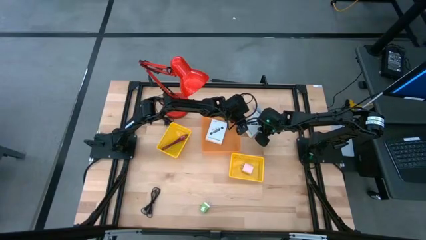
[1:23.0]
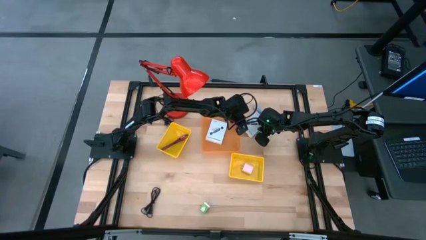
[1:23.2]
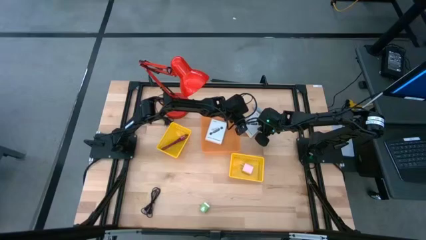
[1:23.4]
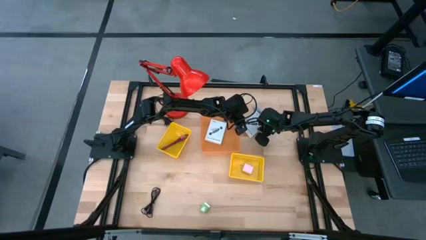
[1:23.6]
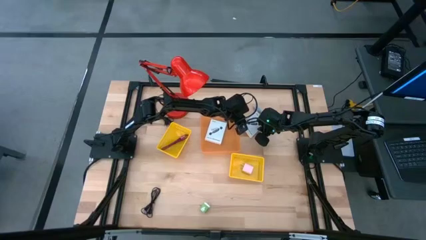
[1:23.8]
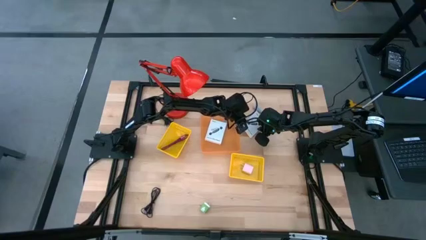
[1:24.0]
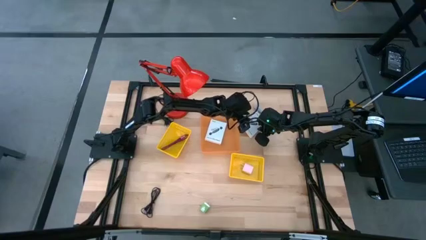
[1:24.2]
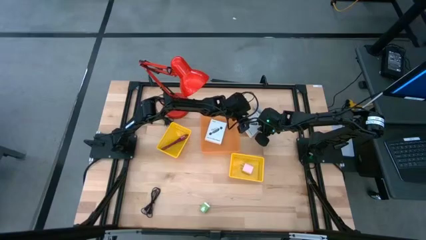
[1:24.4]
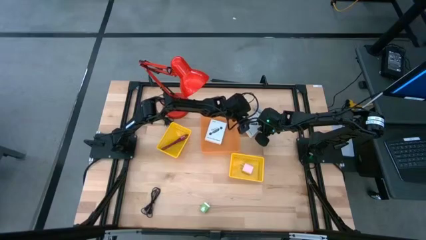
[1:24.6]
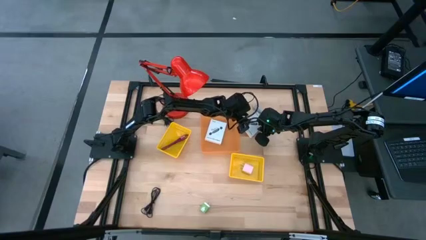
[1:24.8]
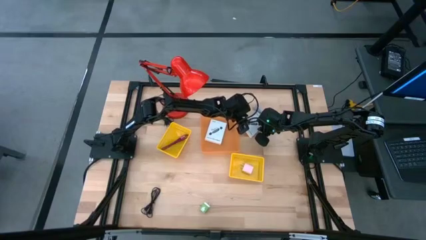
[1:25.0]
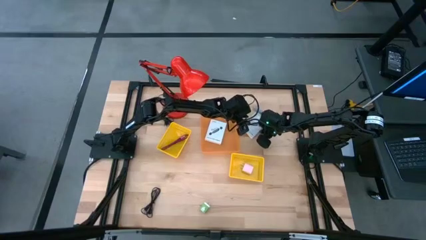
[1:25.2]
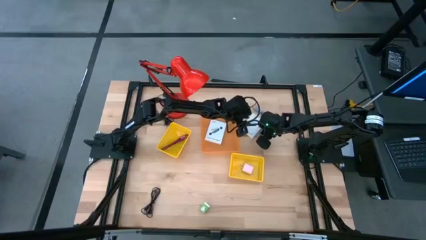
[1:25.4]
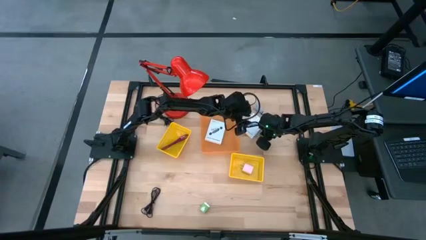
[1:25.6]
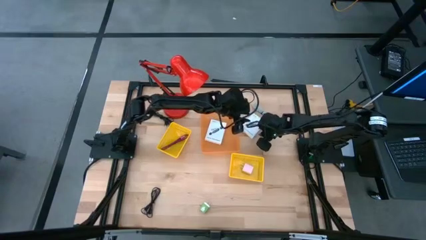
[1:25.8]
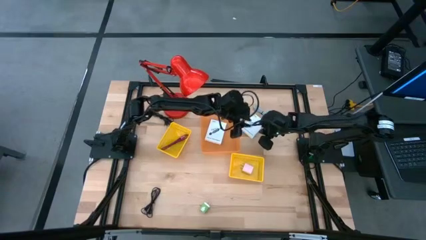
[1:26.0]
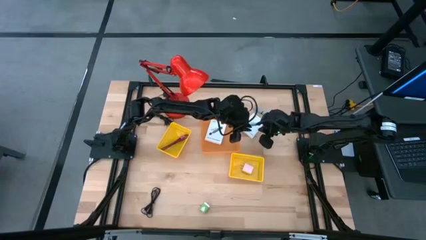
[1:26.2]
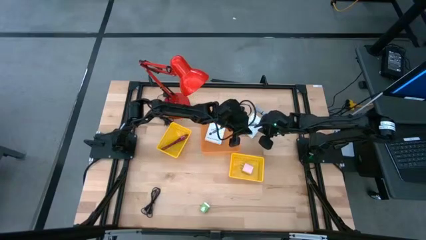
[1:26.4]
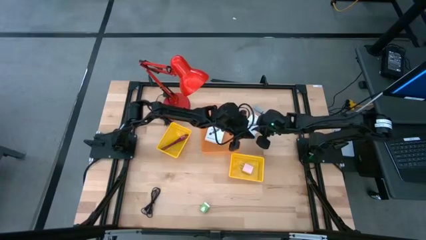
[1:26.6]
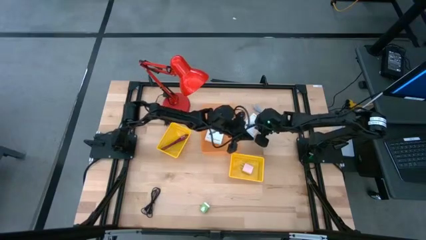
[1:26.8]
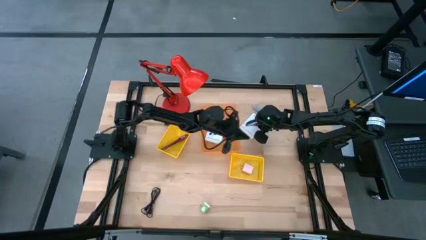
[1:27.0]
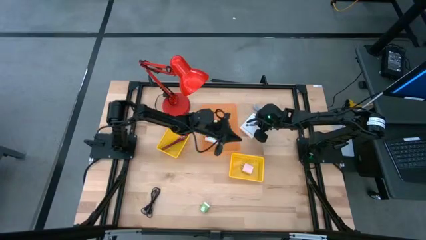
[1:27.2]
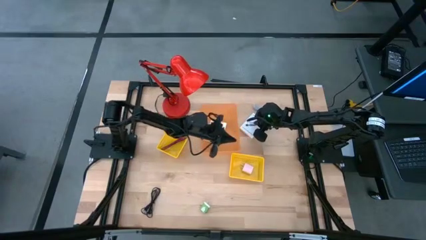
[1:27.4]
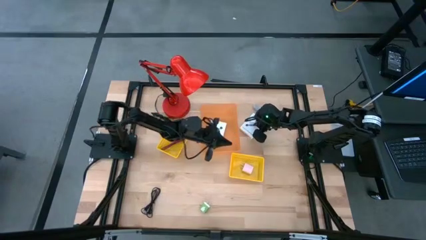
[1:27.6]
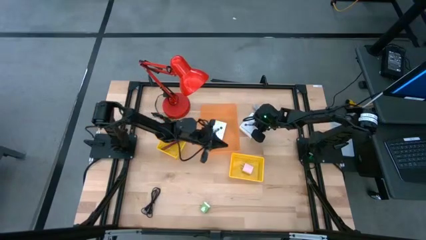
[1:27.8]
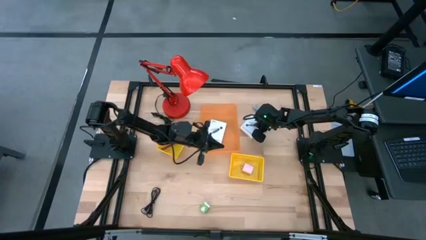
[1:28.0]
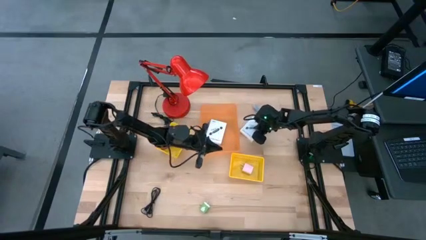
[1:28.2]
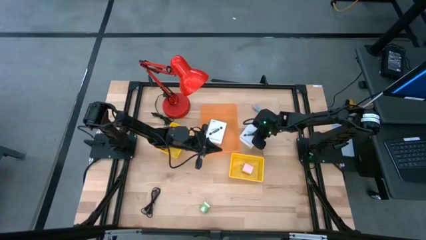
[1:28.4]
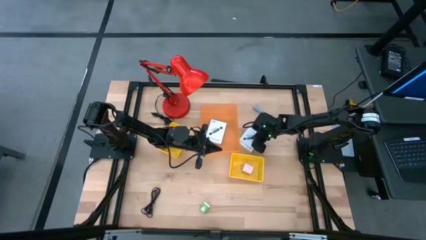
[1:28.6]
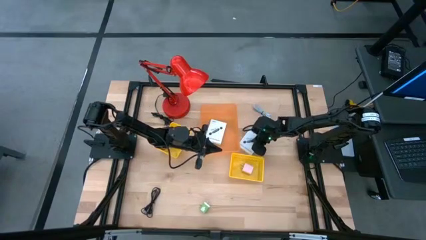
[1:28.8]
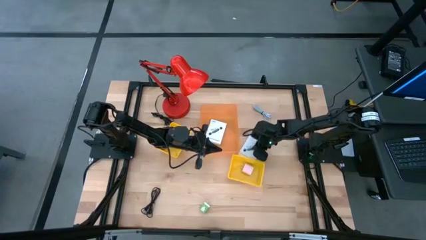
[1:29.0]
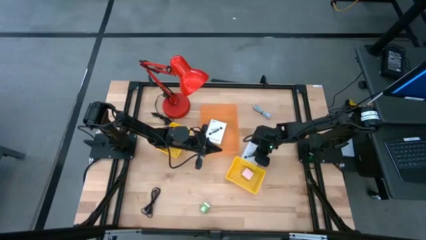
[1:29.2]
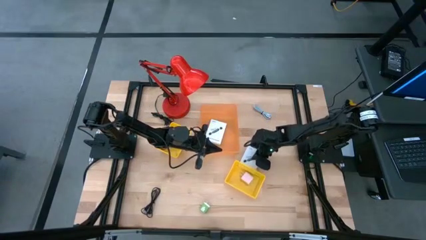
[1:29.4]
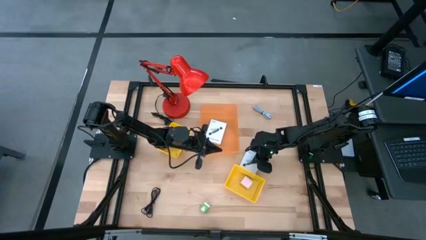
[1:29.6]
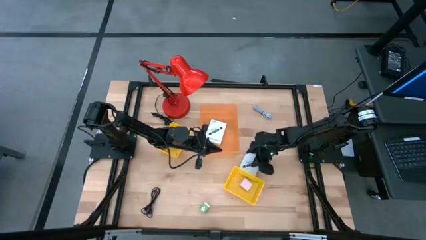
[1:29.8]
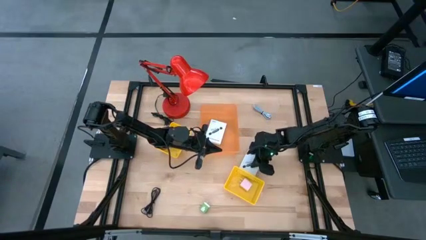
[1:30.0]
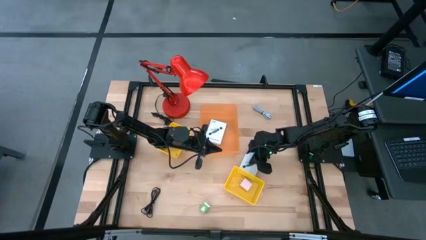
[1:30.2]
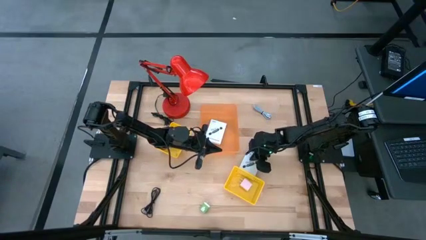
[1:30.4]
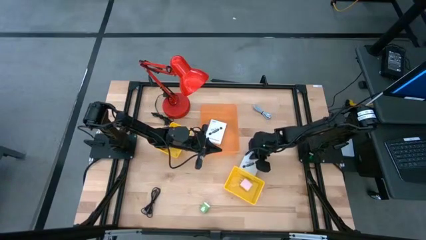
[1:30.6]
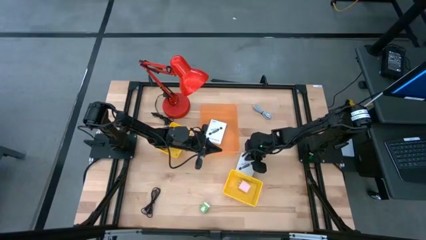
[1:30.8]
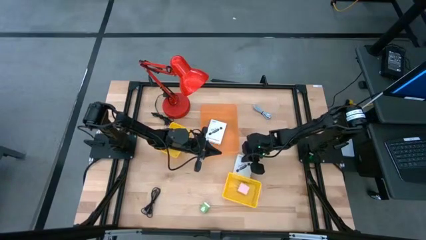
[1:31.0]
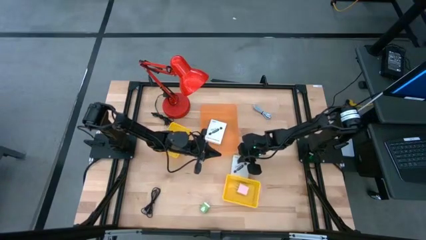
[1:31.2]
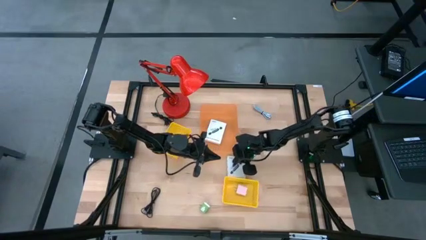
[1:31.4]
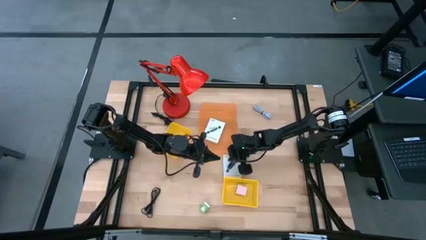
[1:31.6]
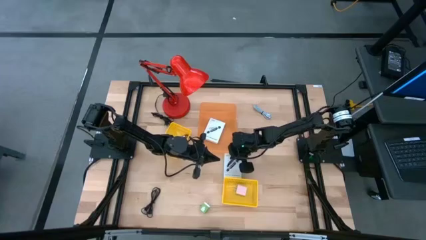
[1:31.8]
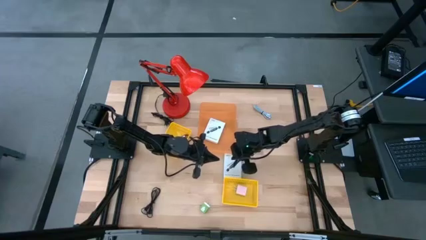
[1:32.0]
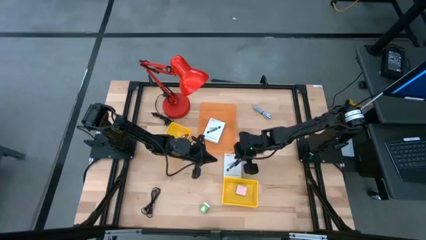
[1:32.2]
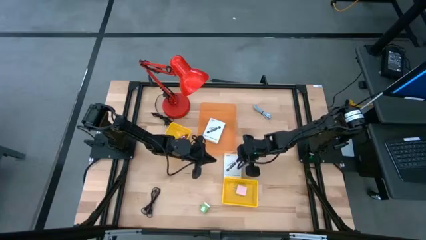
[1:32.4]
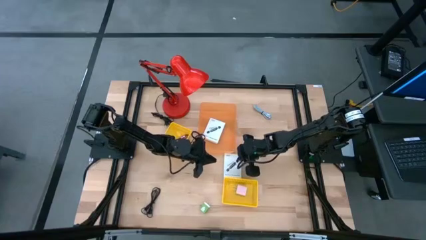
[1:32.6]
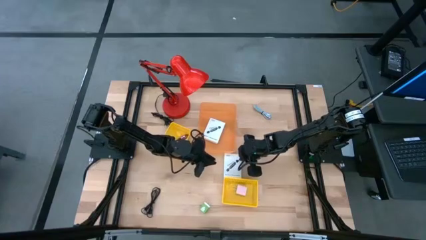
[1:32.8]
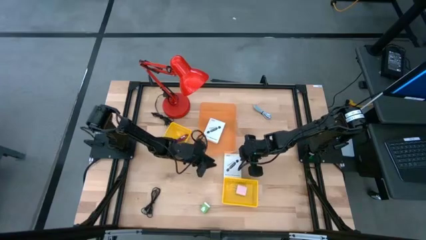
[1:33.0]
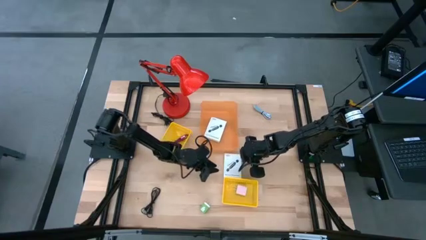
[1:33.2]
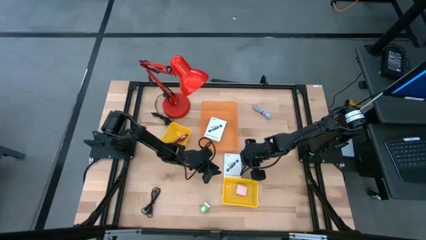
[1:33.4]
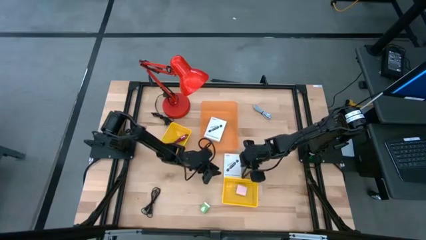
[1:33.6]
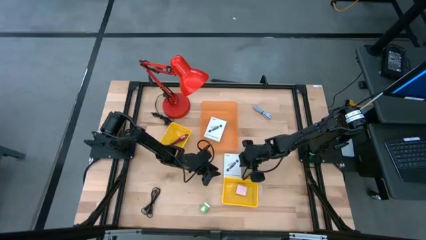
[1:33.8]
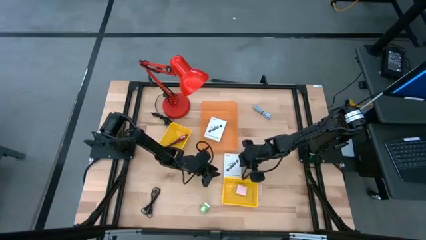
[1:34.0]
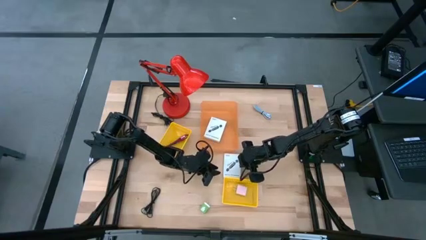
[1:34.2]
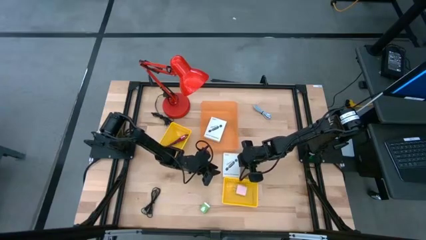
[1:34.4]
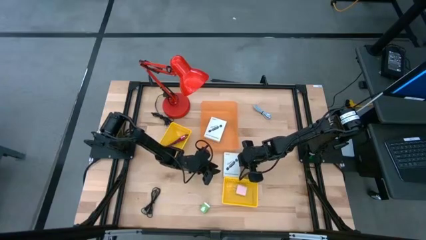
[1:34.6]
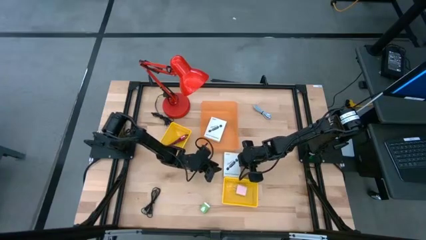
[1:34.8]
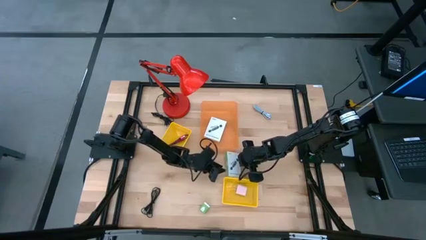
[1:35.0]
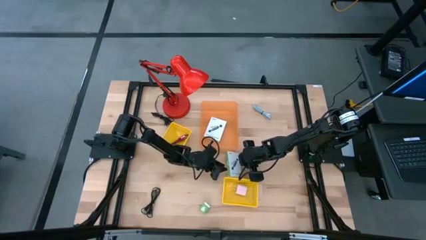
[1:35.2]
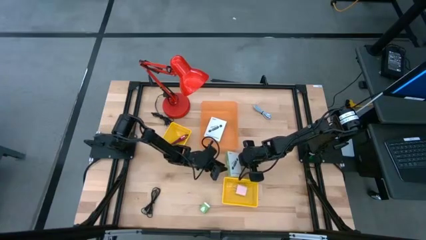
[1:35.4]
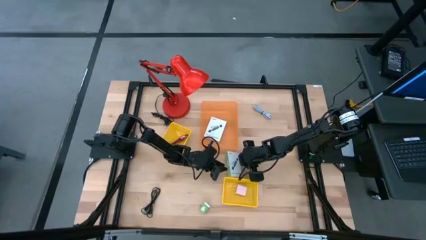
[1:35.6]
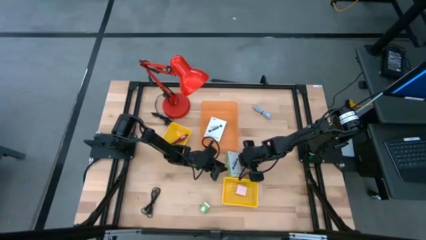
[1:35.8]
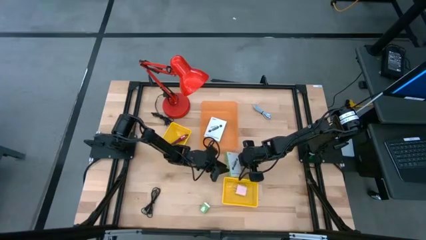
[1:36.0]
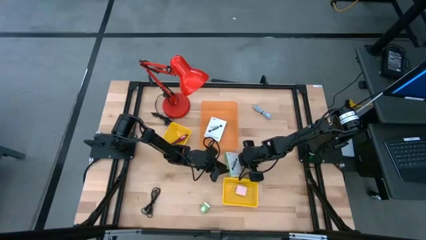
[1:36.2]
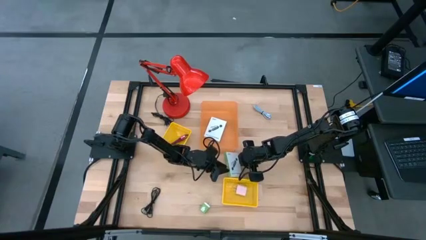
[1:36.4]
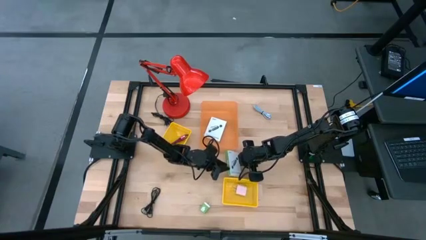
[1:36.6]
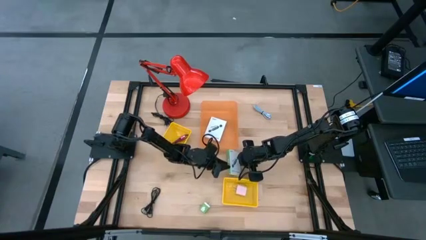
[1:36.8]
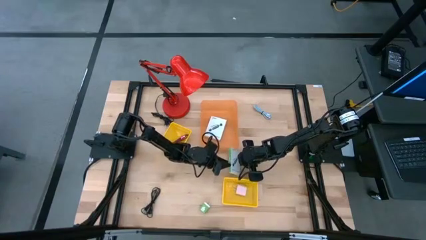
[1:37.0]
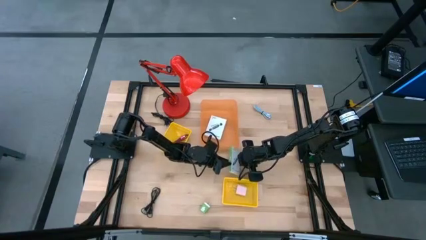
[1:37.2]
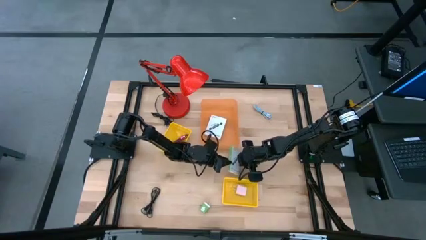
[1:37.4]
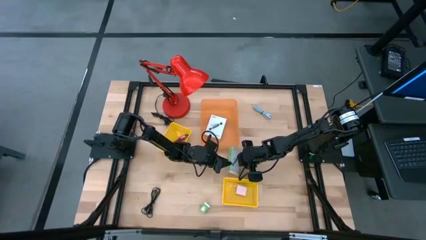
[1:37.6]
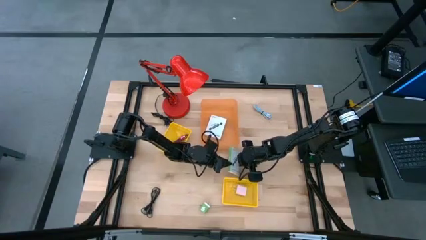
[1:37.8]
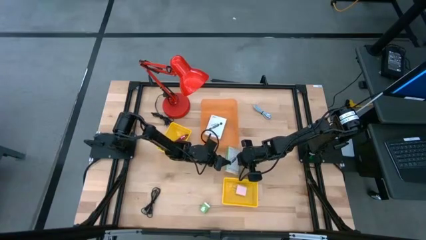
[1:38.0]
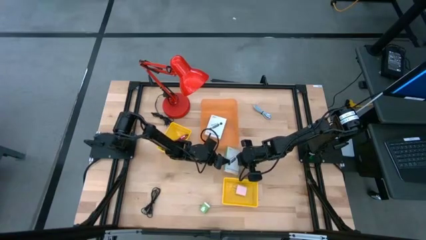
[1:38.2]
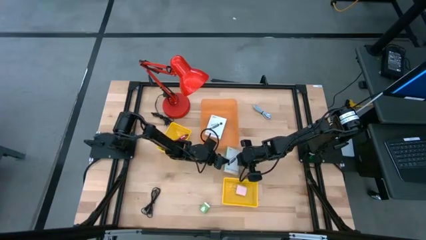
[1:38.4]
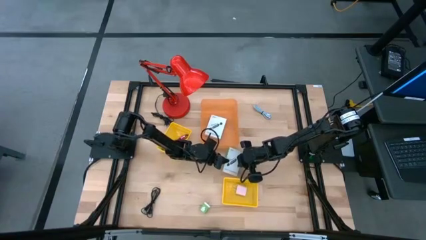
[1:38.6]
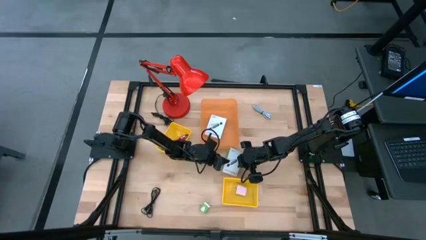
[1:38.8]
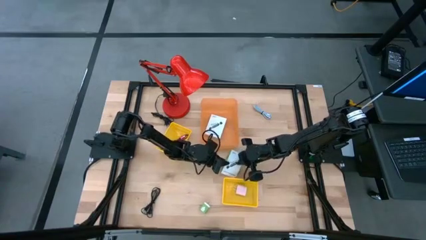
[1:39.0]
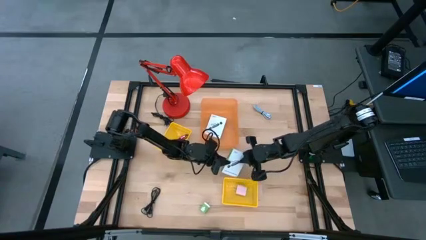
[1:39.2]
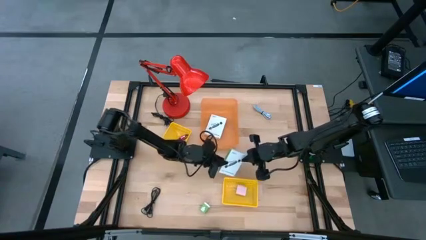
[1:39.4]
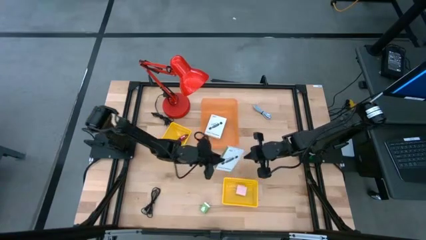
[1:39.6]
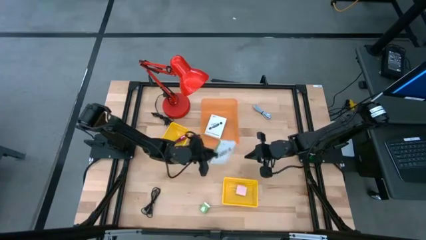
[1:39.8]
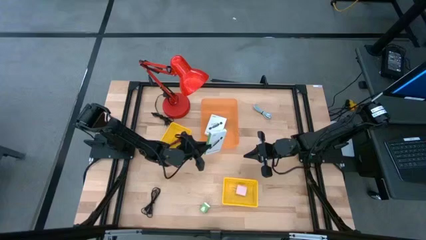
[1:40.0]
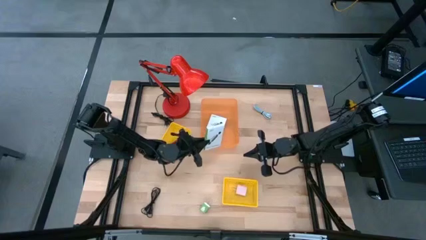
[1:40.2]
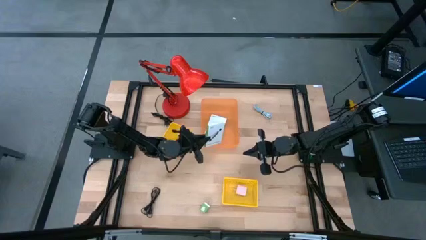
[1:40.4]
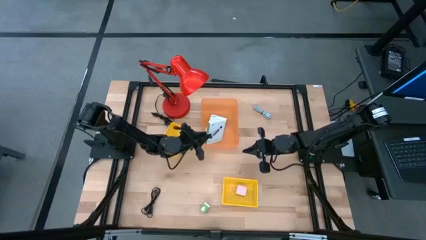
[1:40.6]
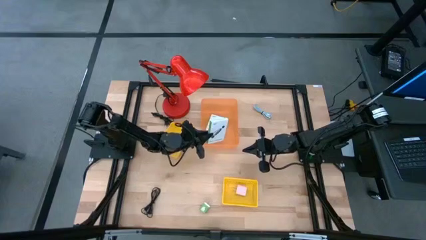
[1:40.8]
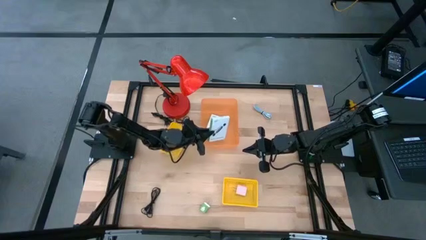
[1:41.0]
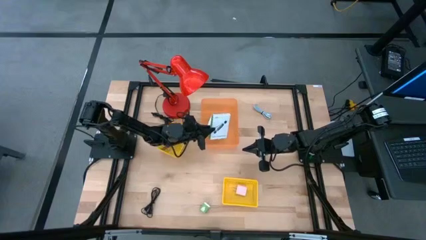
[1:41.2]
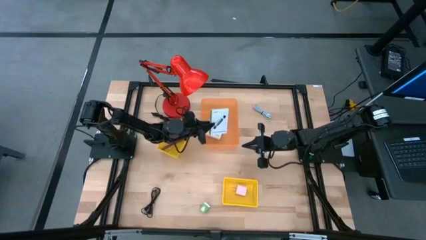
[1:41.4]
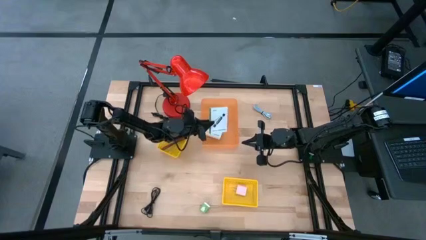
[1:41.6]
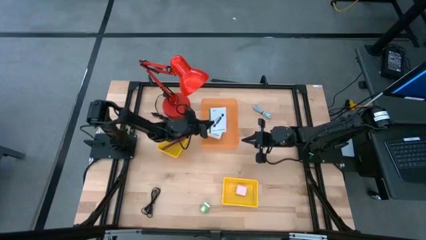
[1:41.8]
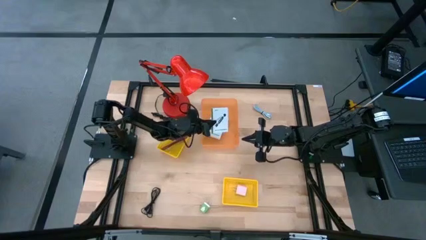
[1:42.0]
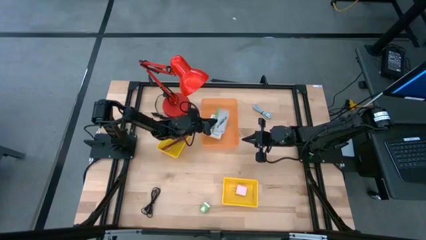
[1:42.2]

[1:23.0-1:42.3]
Task: Pick and place items into bin
Put the card reader box into the orange bin
